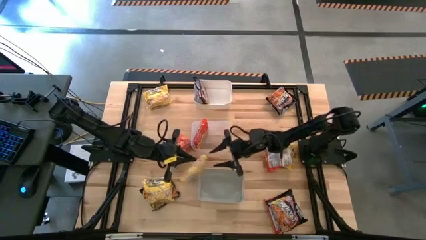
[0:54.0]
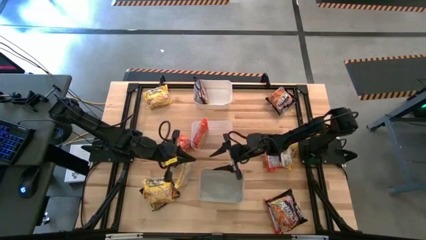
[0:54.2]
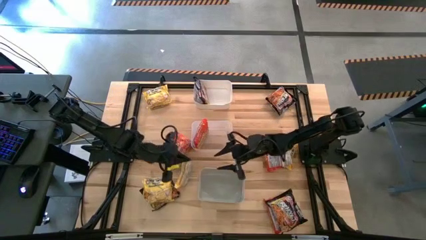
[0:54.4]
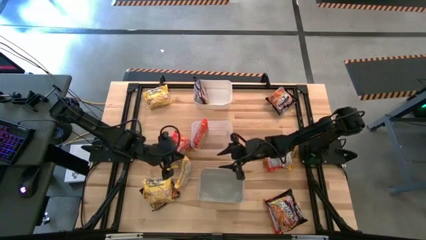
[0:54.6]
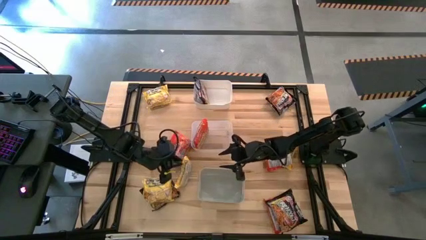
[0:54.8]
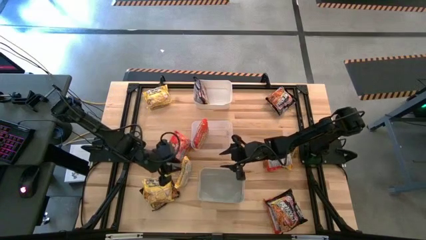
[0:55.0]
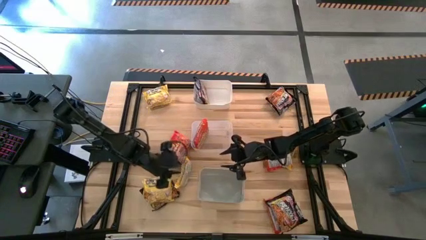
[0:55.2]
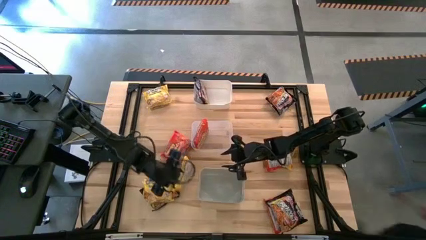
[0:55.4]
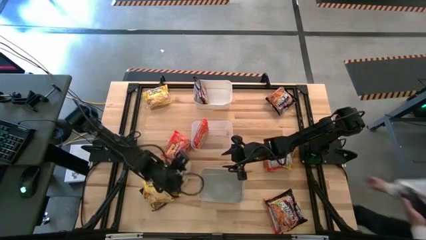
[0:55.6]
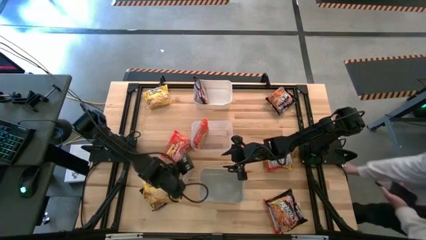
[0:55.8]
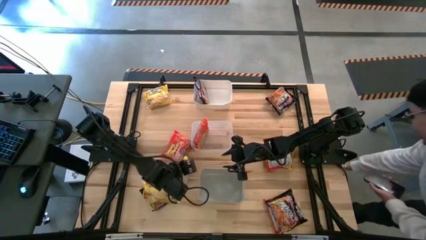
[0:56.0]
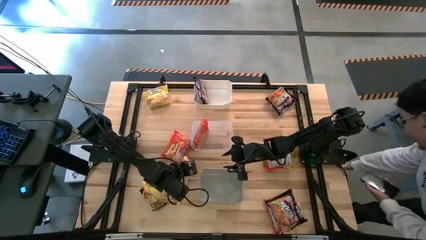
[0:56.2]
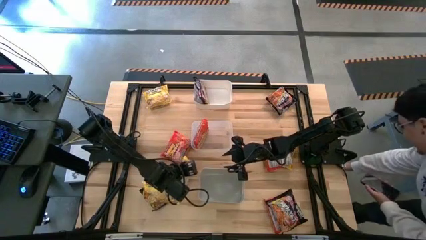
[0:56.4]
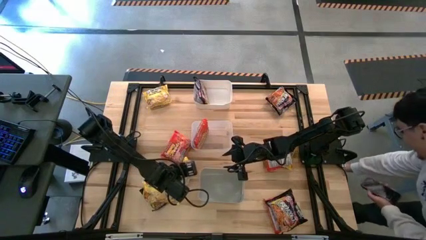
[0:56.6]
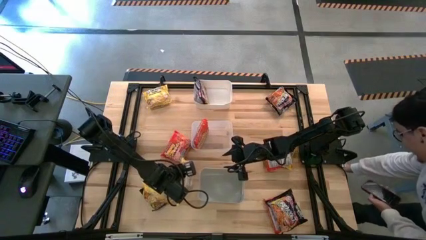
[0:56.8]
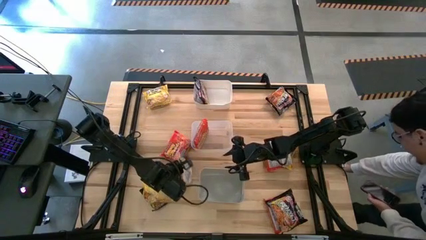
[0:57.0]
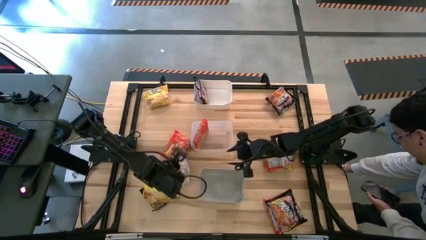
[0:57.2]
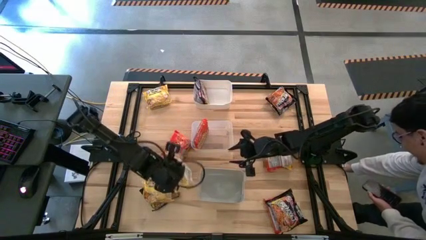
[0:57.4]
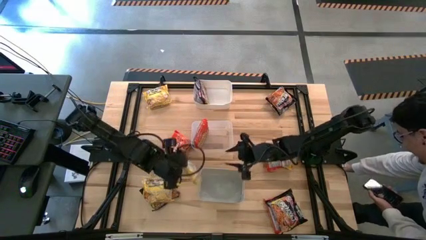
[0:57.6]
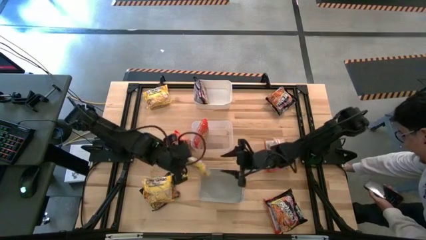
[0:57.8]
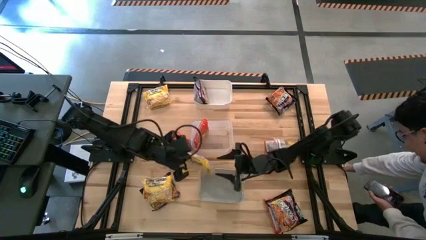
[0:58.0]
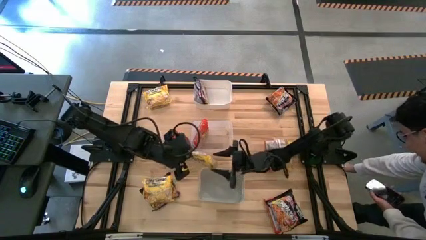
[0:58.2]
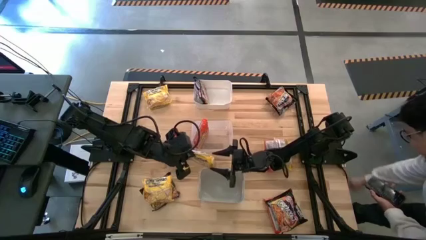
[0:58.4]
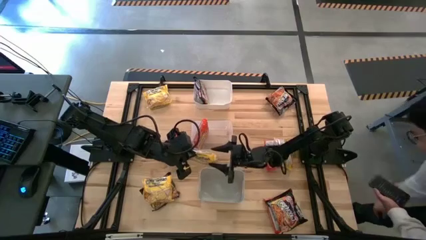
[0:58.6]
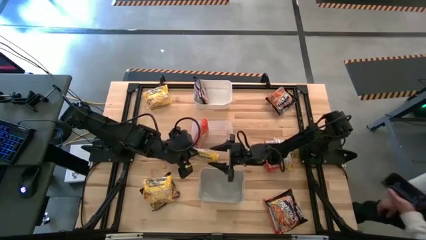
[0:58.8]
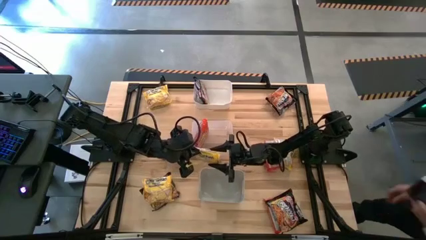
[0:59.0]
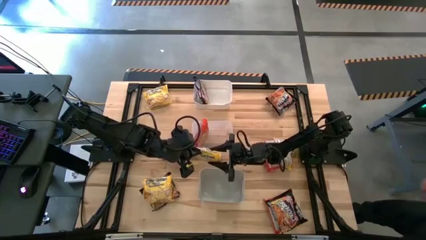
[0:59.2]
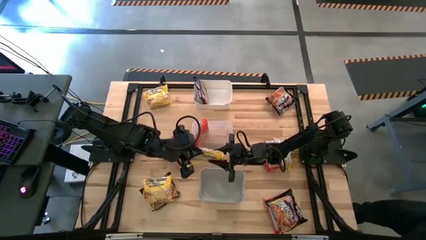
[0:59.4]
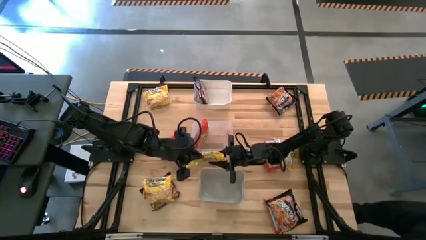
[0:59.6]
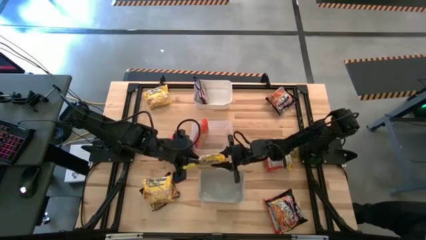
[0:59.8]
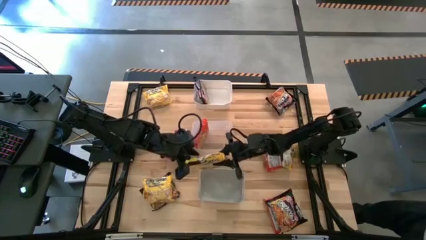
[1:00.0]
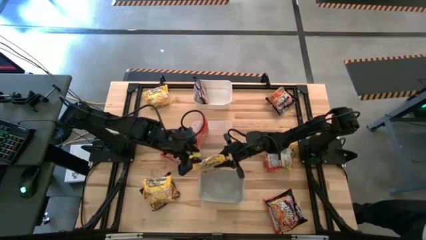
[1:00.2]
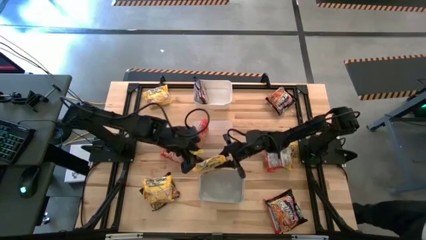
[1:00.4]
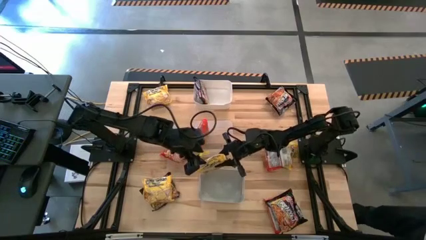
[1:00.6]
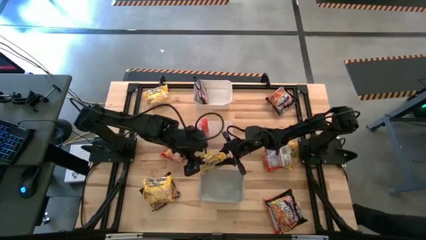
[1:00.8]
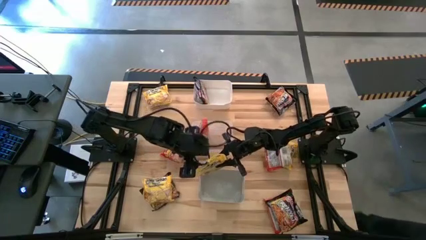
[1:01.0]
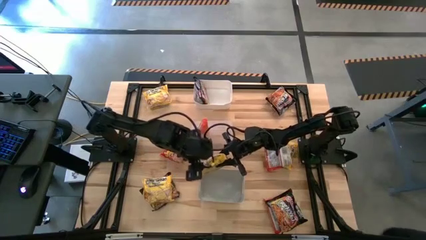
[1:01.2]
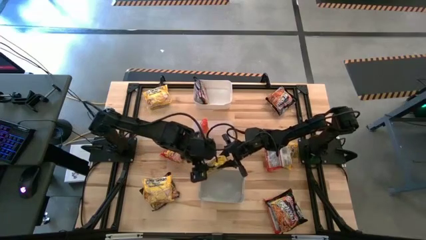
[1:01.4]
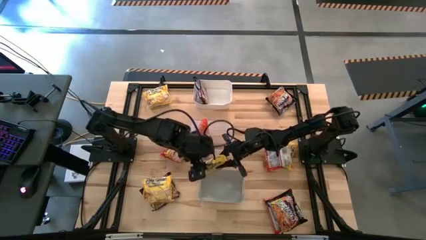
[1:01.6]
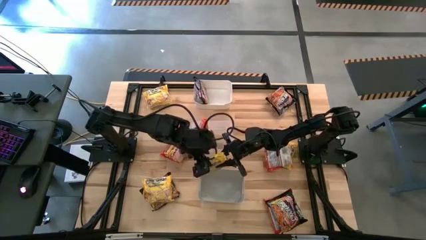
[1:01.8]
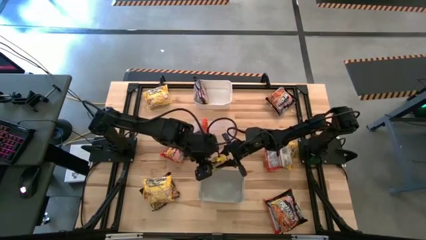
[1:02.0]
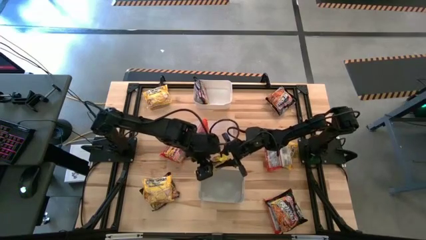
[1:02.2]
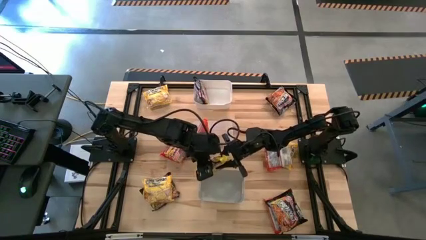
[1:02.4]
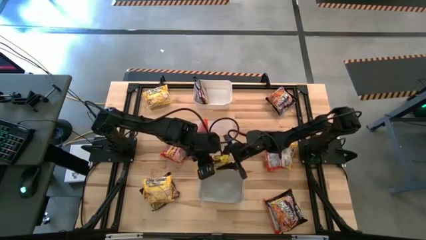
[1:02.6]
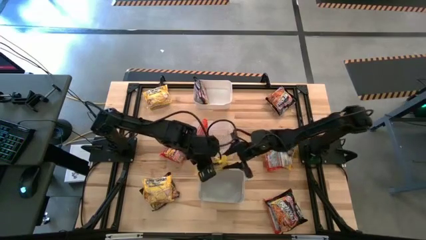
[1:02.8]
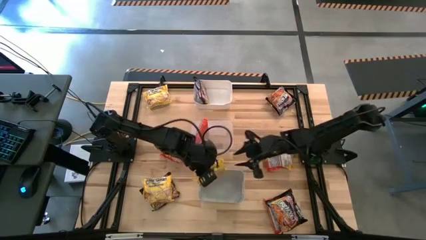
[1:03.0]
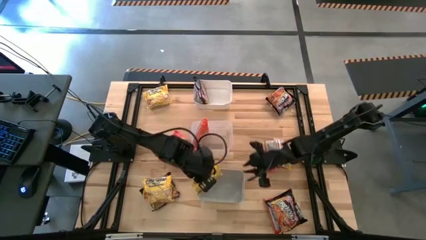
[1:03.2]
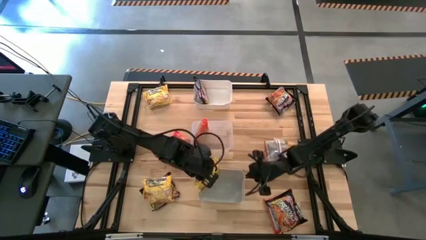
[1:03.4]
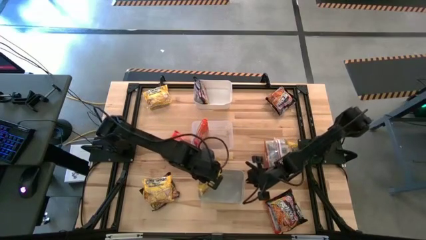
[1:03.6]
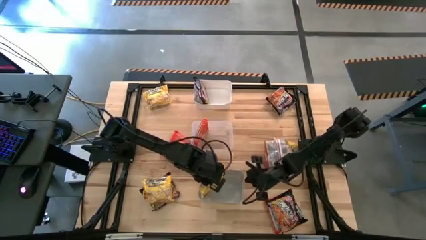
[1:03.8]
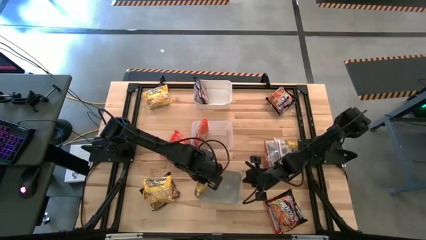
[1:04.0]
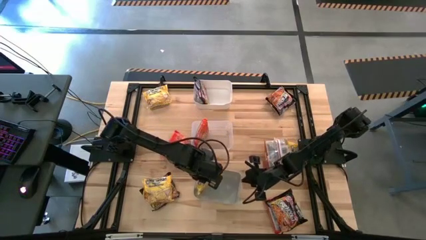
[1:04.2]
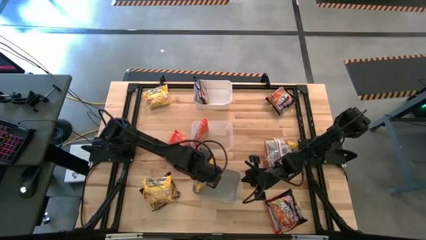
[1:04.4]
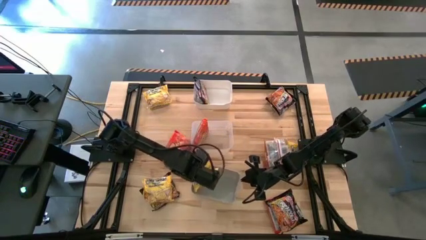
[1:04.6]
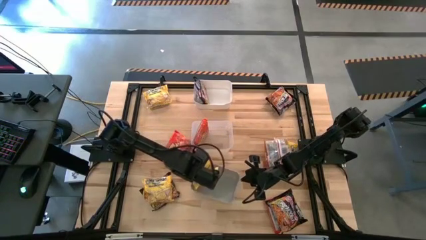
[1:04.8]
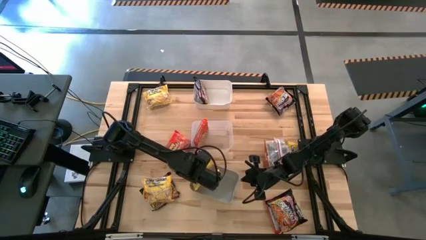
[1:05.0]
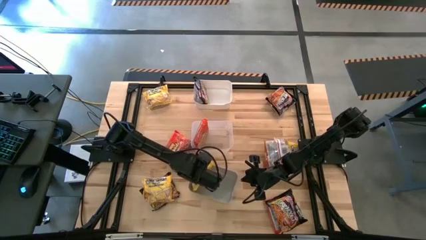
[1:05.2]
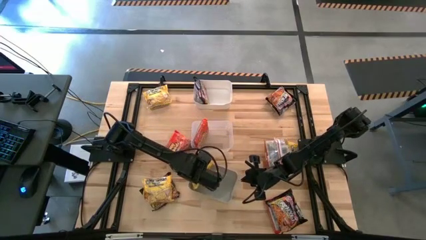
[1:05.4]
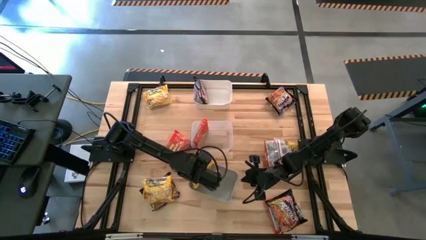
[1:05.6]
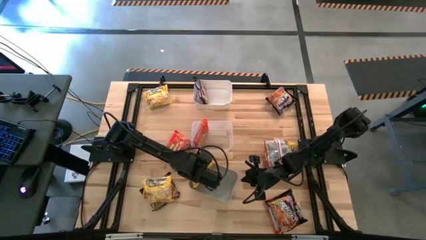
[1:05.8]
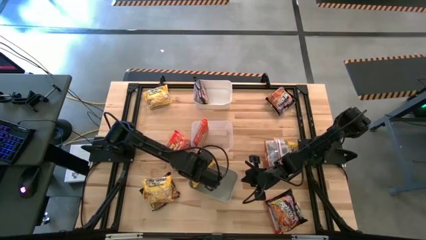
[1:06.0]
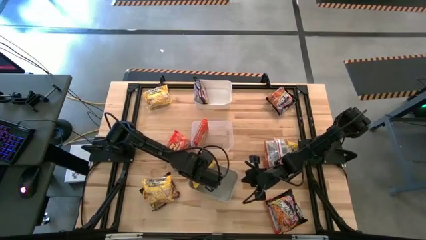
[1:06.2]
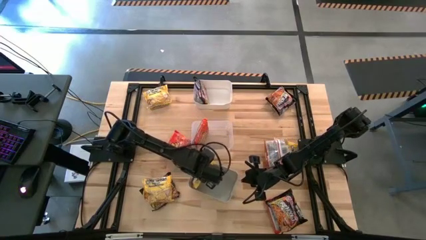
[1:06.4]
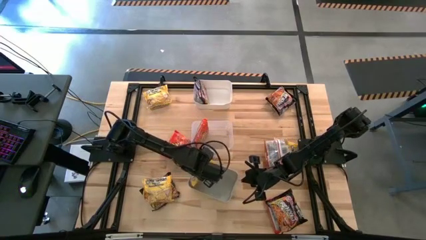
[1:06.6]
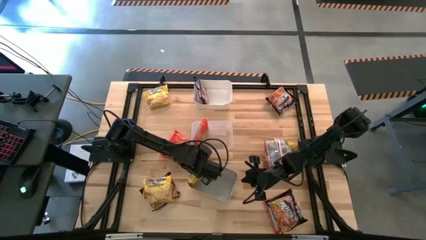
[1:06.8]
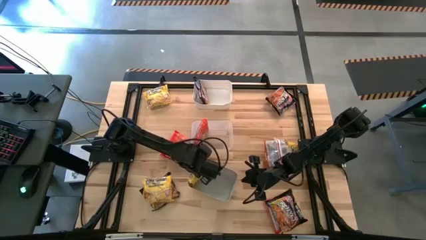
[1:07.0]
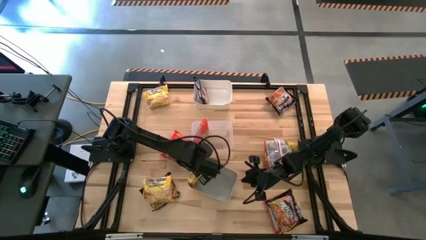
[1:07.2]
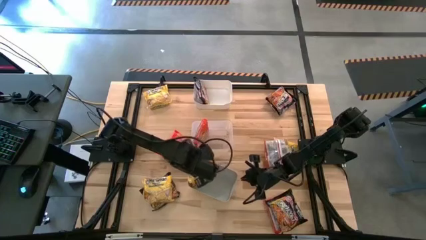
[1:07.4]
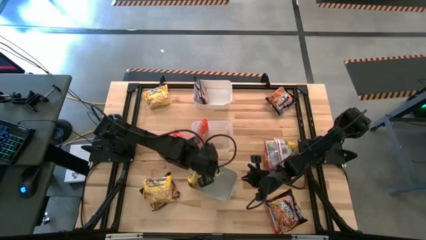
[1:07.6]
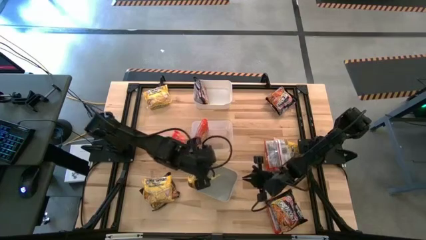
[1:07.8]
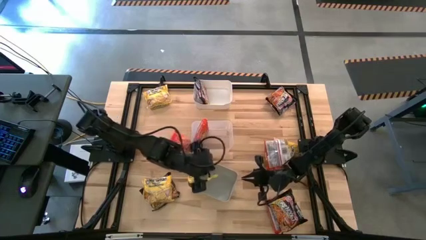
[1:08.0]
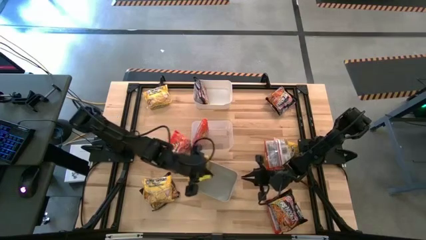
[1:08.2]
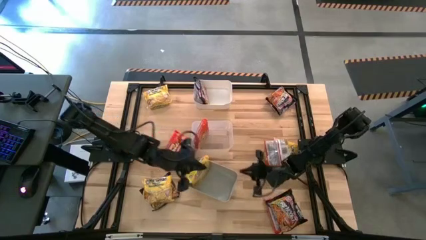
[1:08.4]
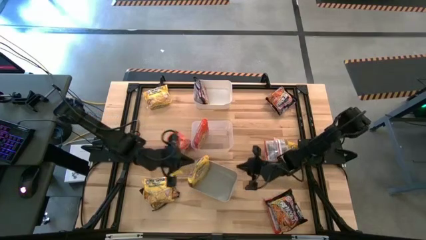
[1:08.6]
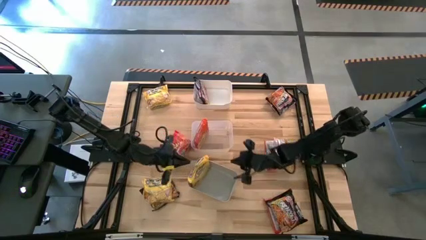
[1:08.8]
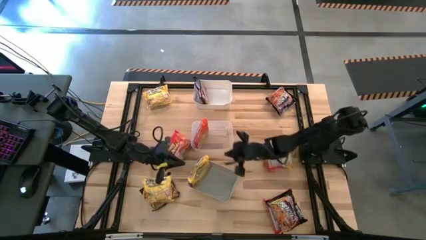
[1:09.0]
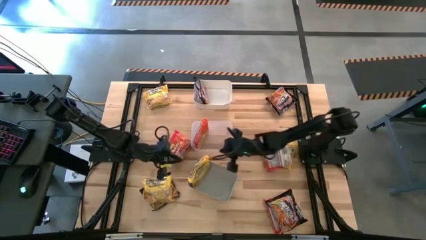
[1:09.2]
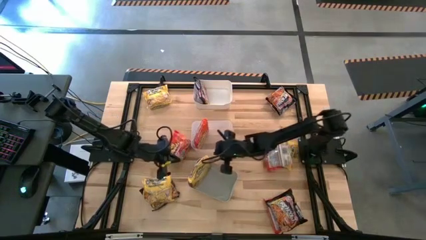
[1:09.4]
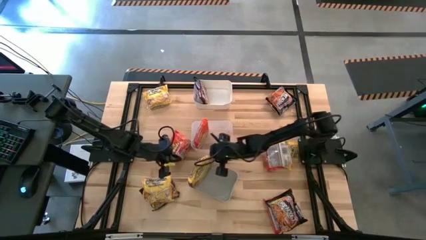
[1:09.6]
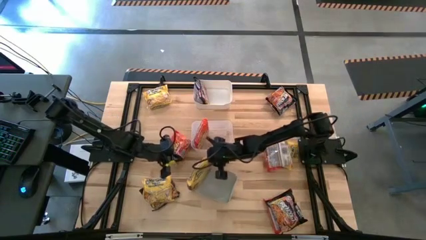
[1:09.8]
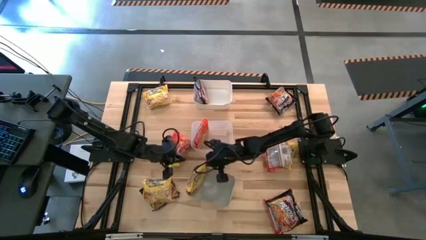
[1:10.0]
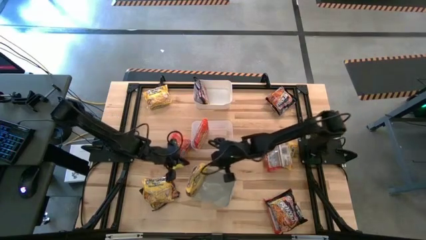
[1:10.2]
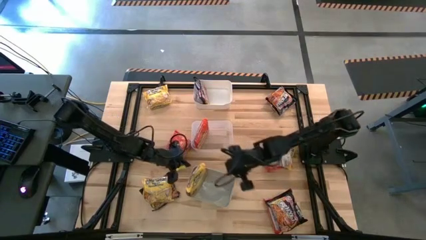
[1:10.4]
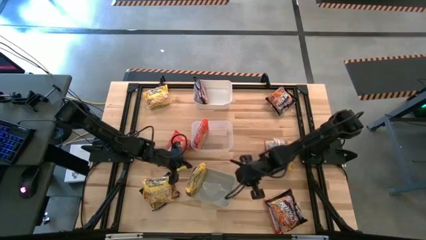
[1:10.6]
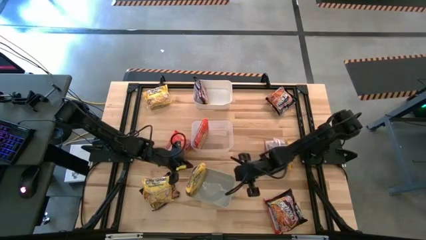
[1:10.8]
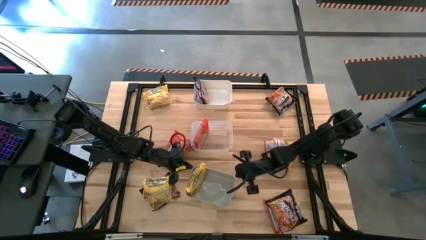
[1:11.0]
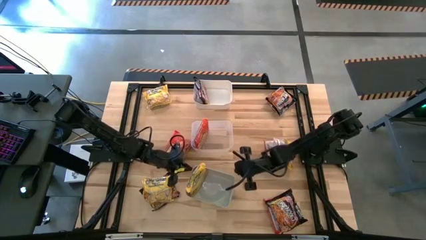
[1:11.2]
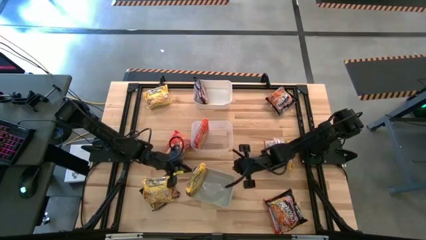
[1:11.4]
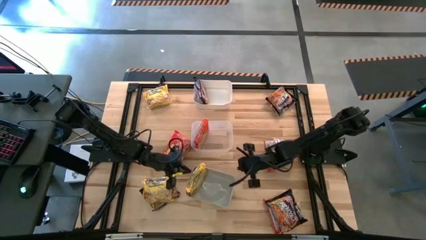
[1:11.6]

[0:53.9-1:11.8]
Task: Sort Maruchan noodles
Put the yellow noodle pack into the gray bin
